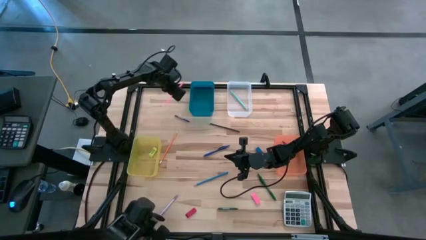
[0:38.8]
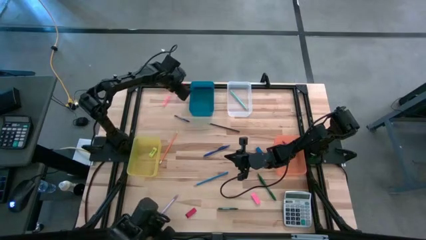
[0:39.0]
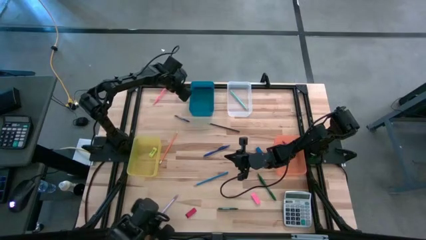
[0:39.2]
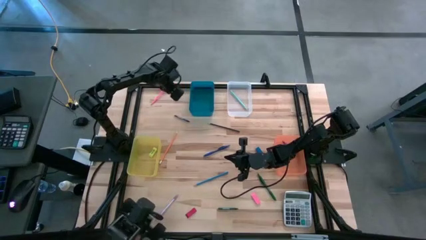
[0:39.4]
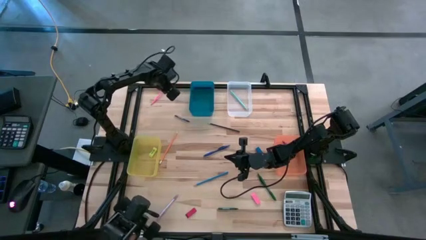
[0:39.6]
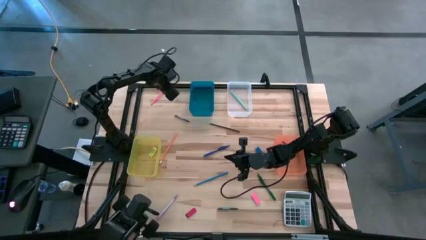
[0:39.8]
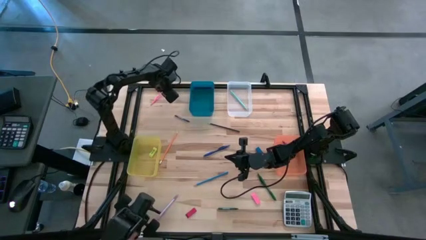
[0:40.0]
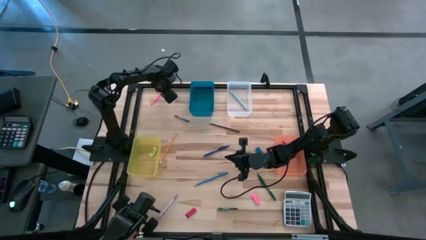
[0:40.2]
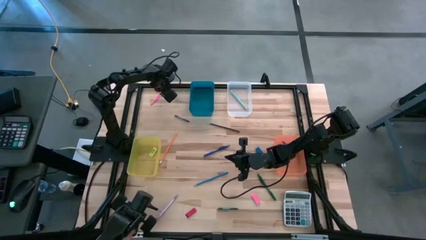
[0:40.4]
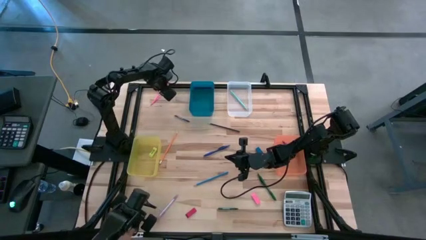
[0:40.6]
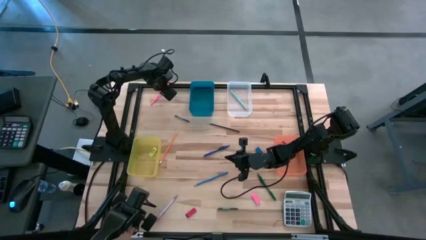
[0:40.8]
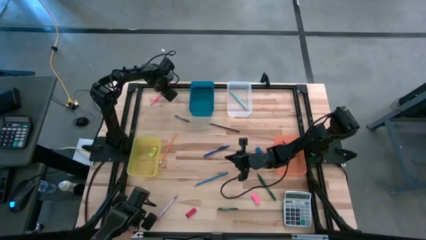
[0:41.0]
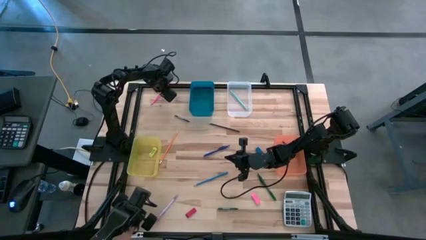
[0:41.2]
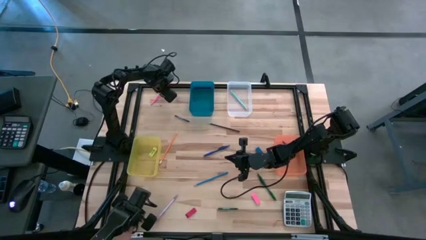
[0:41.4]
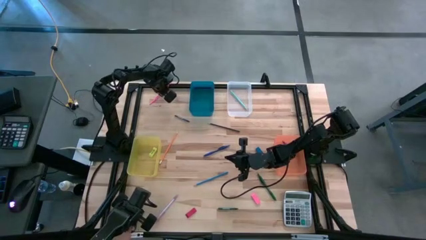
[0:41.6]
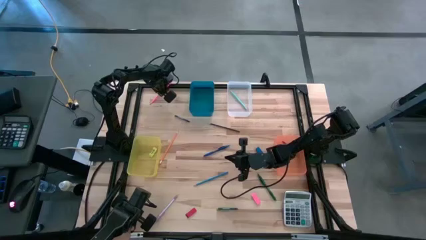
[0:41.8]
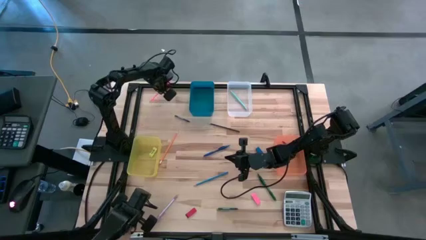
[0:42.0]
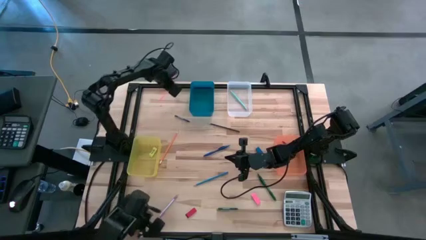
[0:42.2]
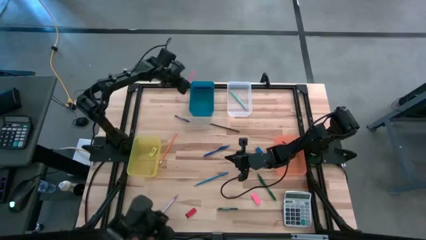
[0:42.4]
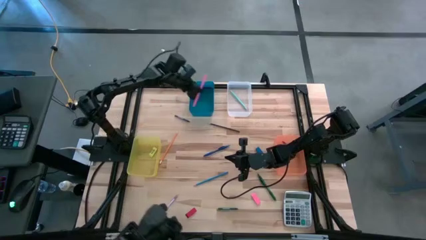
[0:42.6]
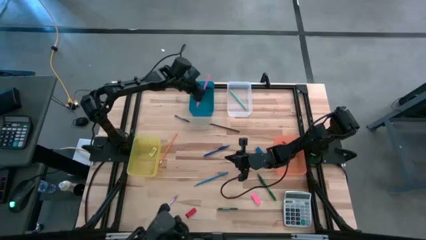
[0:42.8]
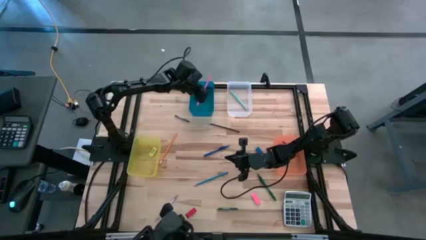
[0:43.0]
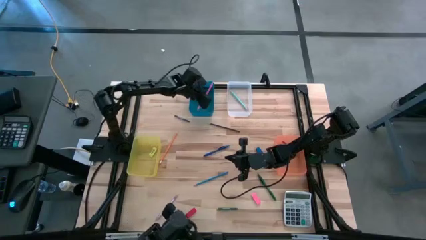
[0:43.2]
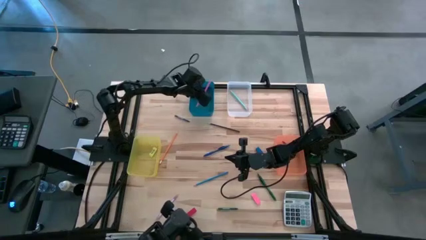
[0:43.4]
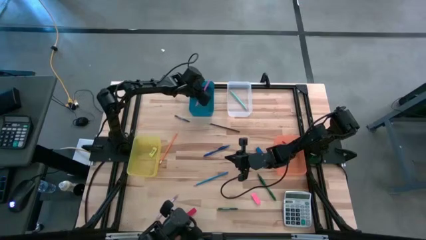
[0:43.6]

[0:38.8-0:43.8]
Task: Sort crayons/erasers/pens/pencils in bins
Put the pink pencil into the blue bin

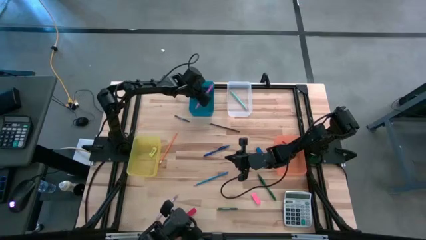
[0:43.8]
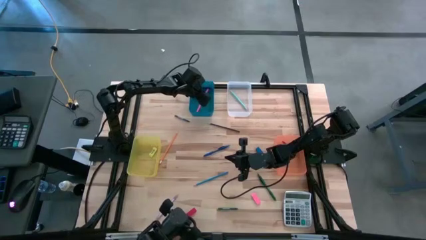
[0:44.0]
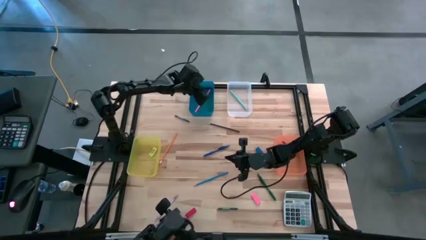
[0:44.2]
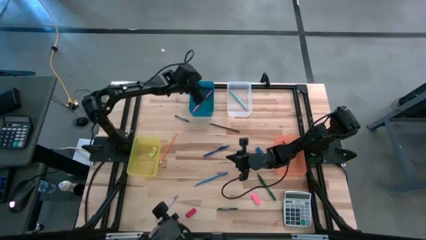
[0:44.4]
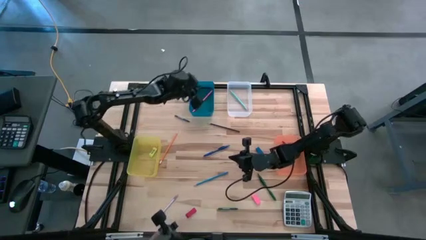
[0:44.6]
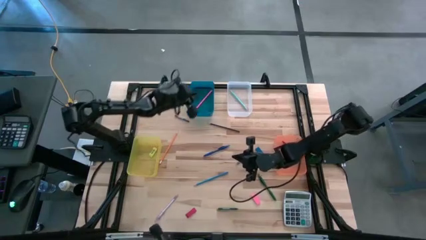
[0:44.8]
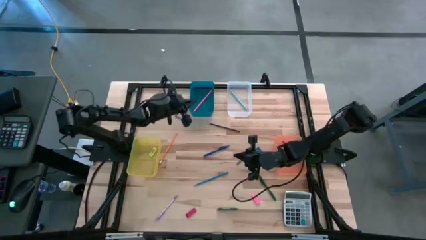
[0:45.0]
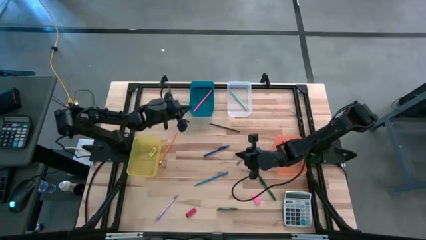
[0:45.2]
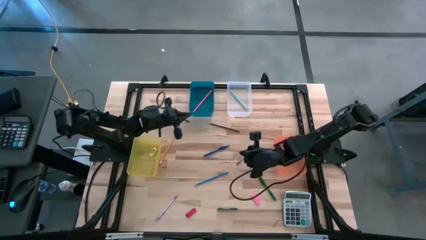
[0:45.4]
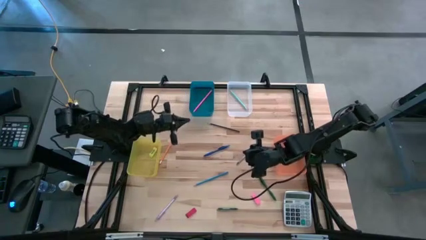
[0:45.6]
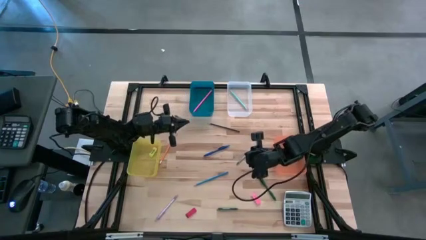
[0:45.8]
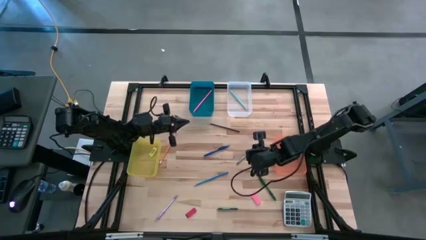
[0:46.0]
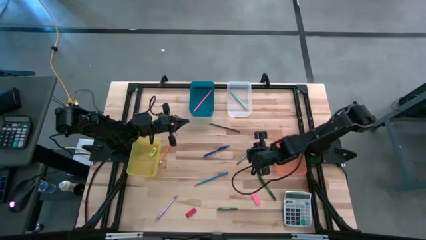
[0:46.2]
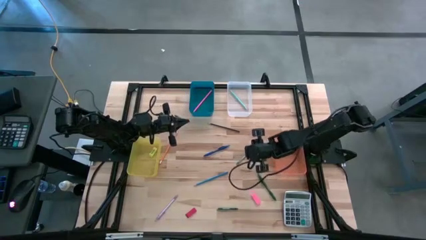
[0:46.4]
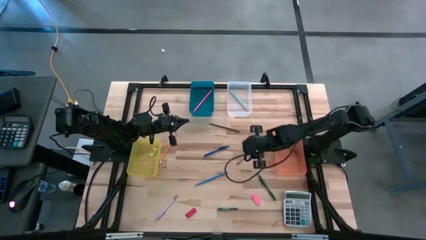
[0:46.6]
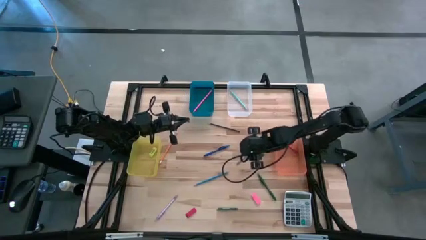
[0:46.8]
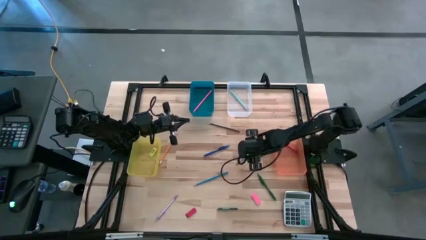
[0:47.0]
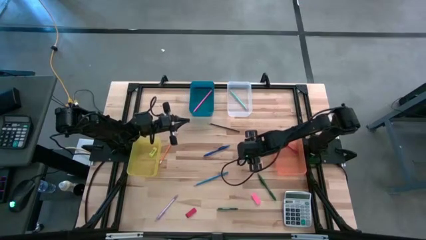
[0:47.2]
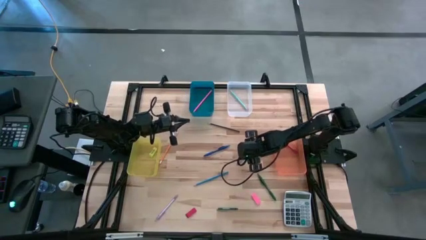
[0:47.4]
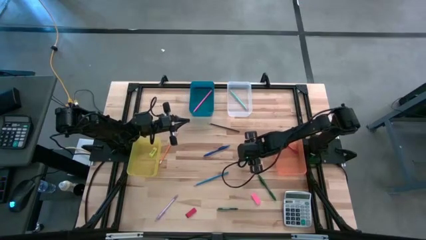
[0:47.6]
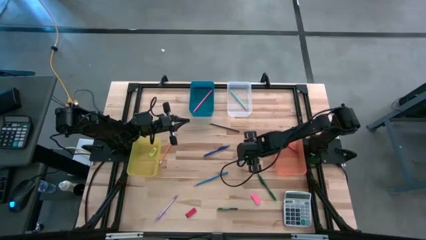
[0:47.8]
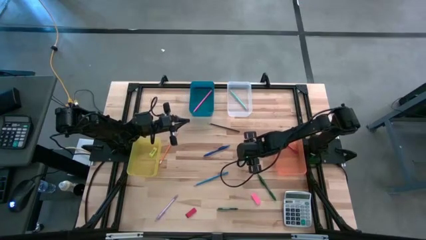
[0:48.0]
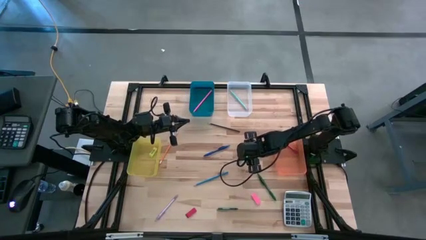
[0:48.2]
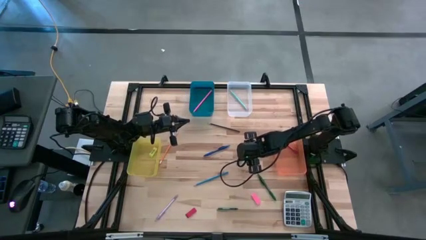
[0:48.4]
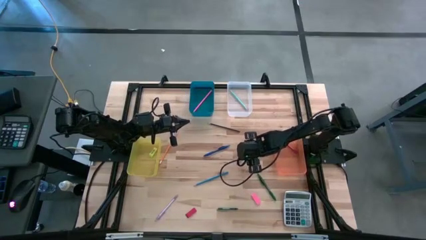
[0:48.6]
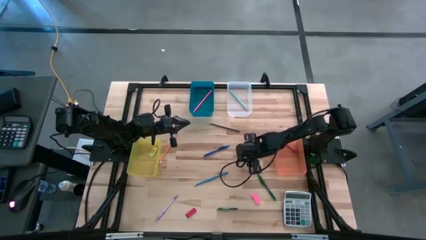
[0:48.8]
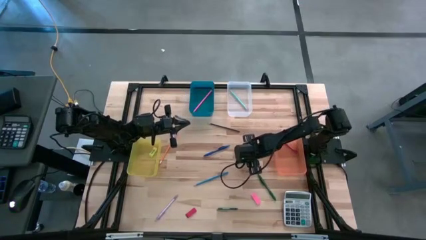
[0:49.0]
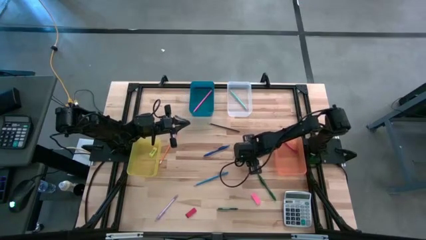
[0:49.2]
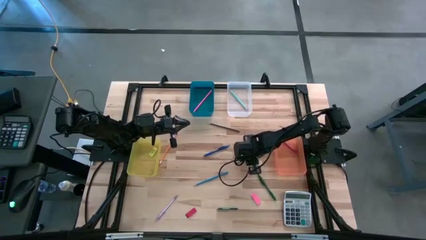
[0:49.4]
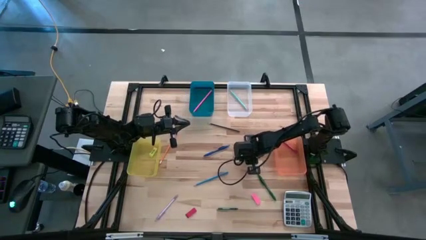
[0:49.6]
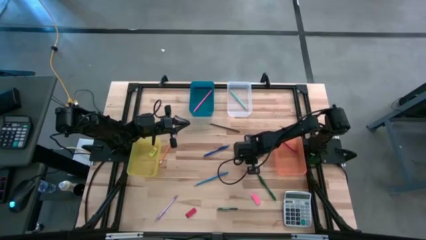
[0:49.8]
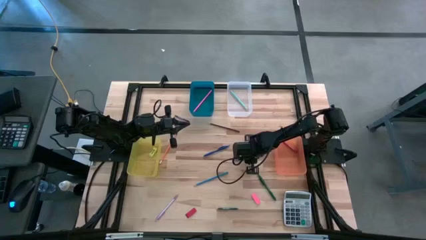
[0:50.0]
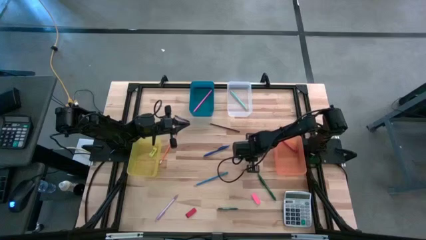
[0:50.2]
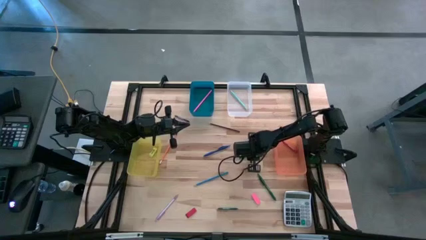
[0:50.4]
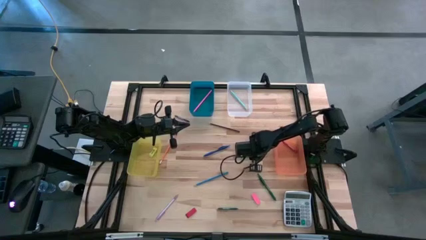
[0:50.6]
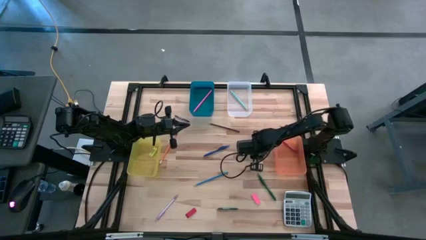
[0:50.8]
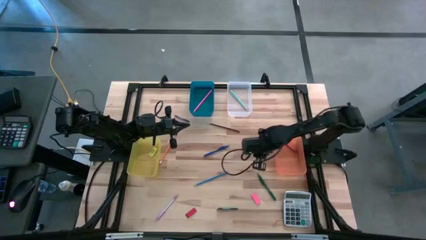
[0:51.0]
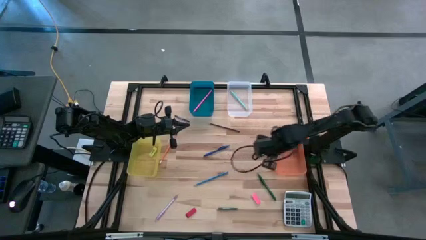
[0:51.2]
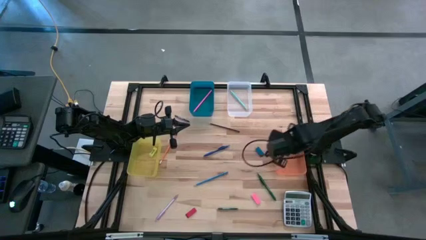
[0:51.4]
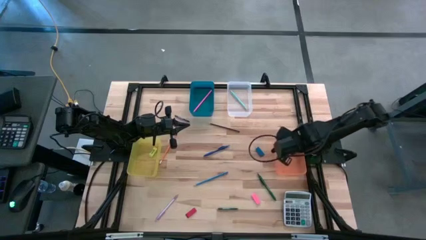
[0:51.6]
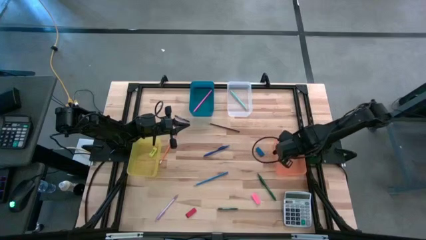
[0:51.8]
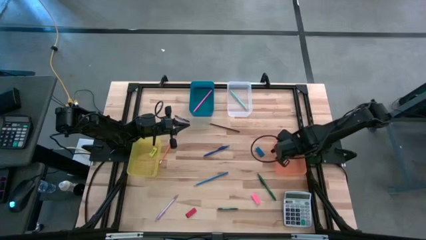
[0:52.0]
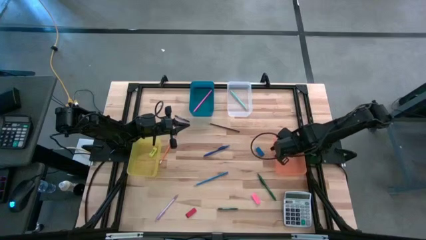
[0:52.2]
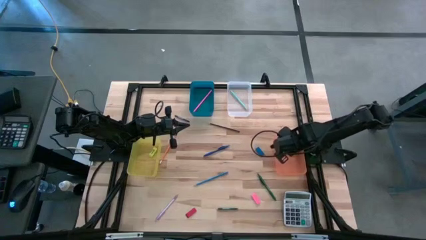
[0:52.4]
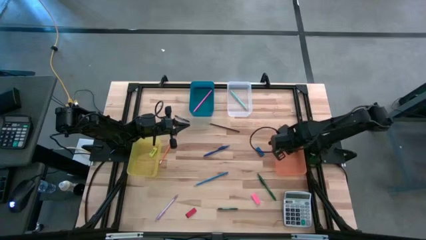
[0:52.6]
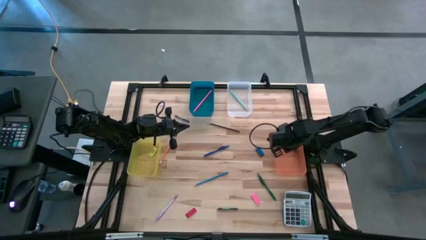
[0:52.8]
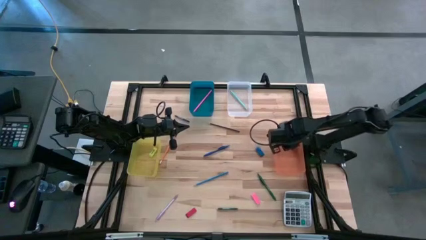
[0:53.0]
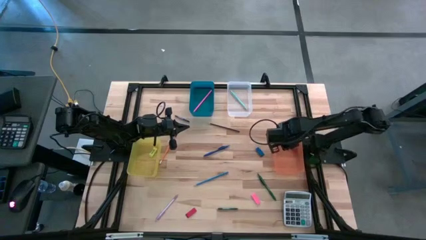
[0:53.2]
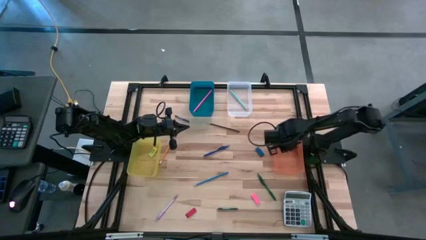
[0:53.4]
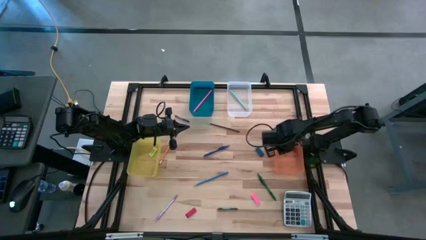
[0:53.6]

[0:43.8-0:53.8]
Put the gray crayon into the orange bin

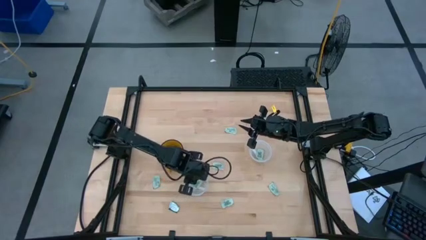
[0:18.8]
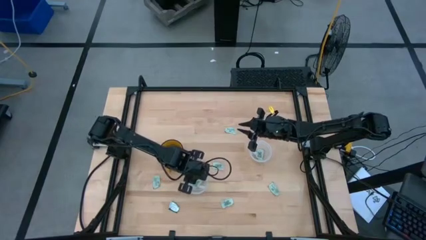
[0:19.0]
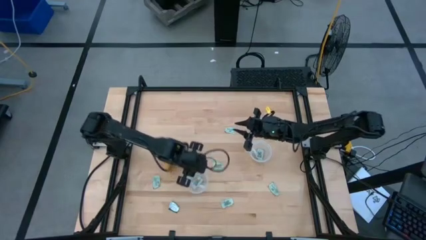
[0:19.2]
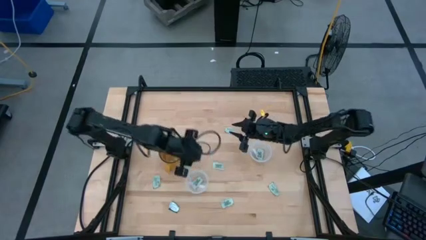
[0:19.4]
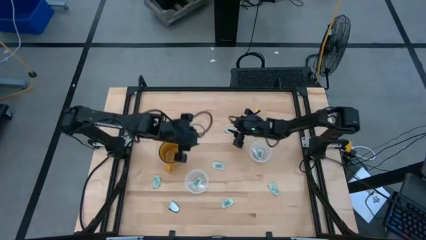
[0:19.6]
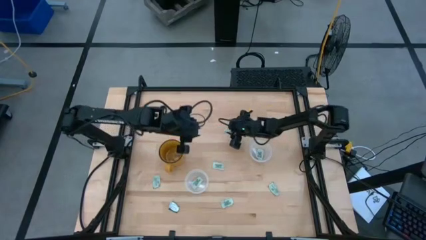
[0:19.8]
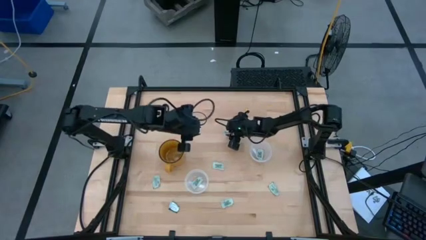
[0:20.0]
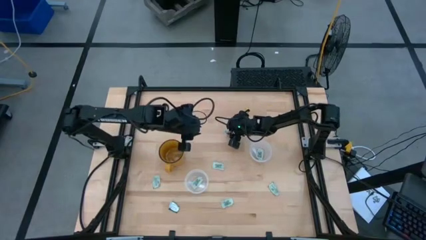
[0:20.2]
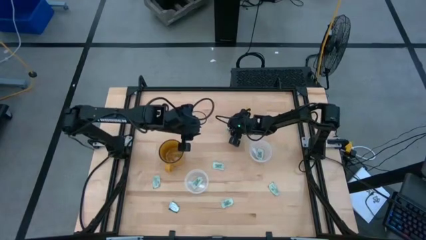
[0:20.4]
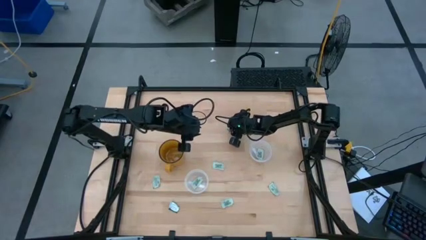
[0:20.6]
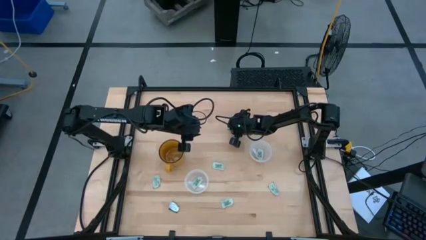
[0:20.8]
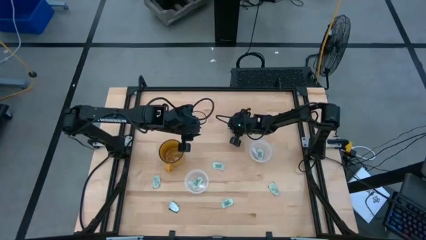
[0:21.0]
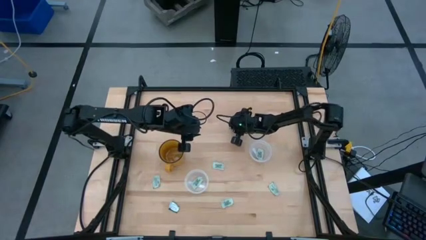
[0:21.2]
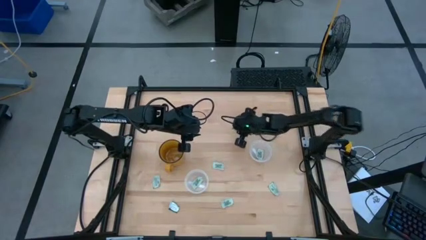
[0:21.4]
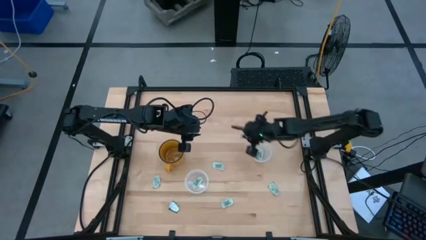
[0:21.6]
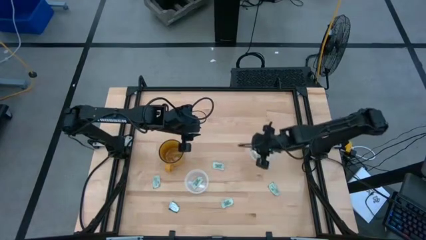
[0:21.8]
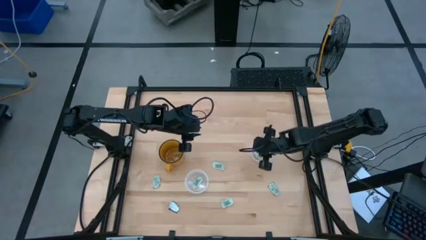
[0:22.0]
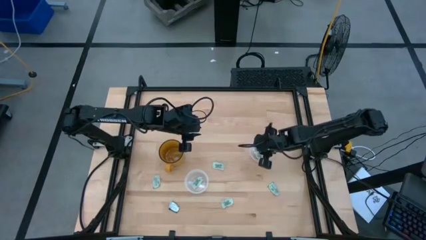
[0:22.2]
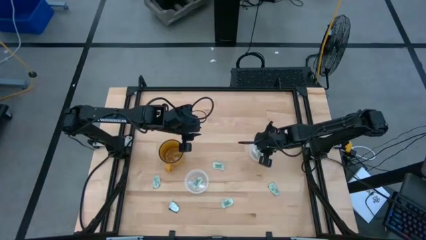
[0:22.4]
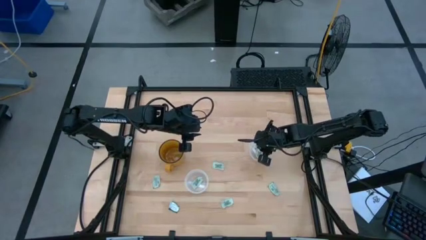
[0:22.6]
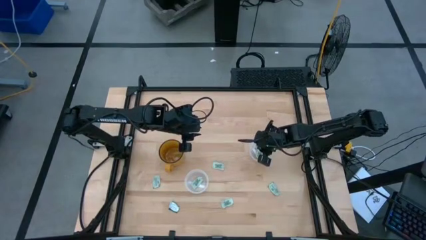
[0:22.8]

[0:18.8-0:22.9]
Task: Pick and place Stevia / Truvia into bins
Put the white stevia packet into the right transparent container
